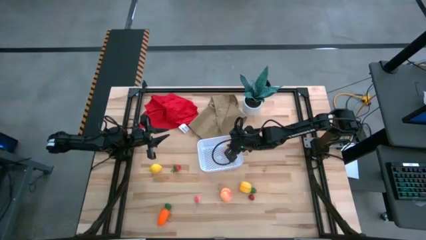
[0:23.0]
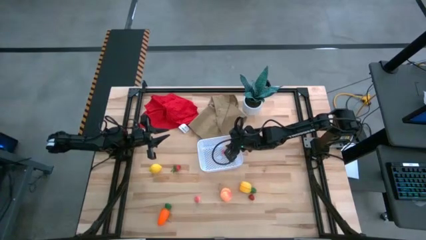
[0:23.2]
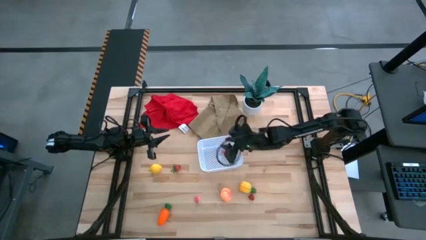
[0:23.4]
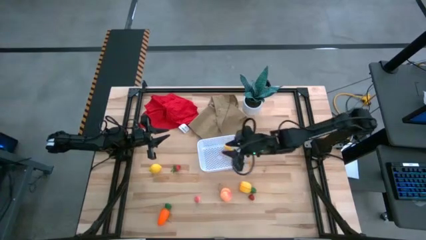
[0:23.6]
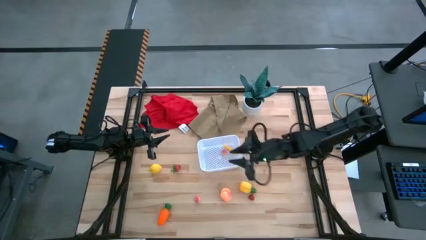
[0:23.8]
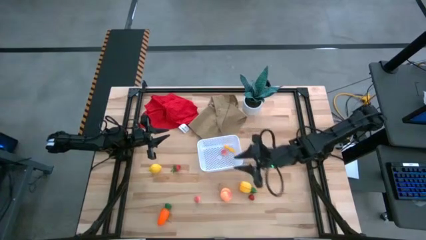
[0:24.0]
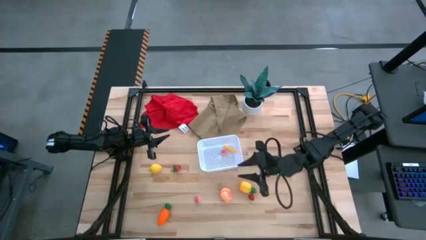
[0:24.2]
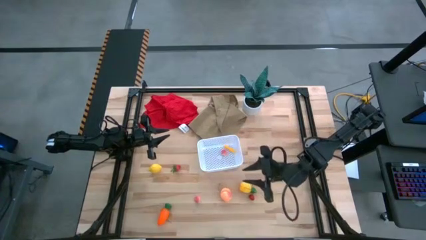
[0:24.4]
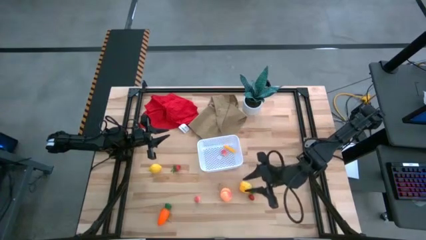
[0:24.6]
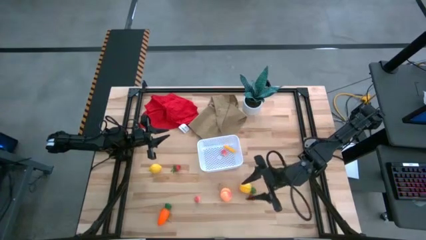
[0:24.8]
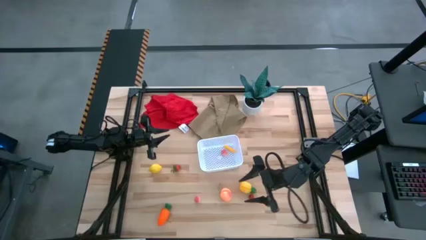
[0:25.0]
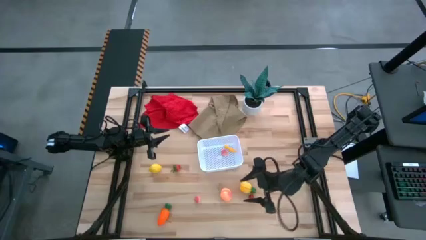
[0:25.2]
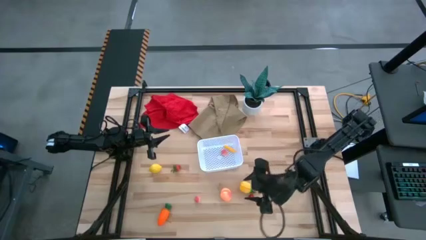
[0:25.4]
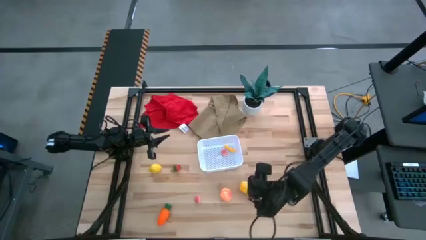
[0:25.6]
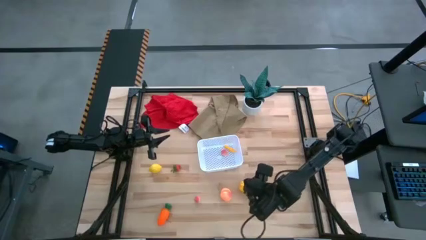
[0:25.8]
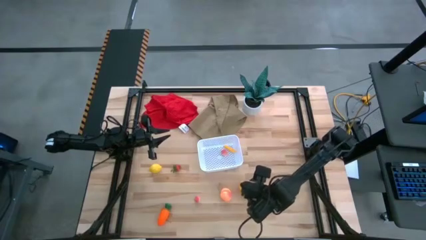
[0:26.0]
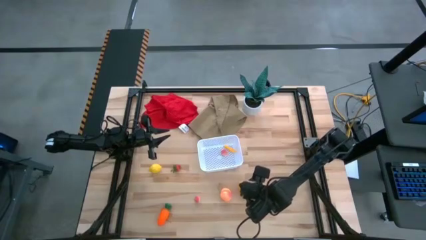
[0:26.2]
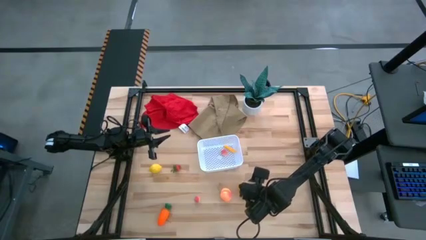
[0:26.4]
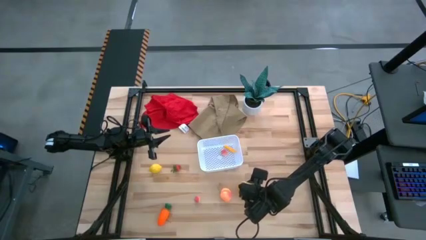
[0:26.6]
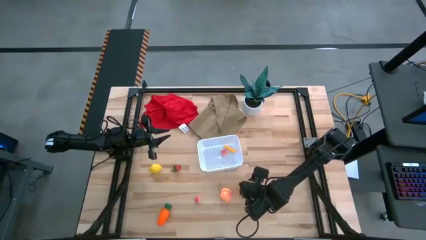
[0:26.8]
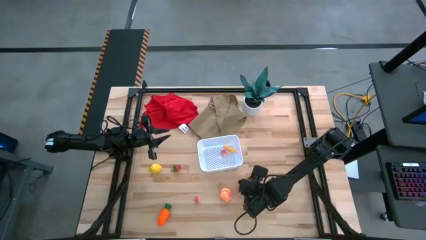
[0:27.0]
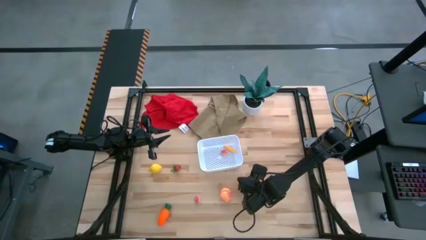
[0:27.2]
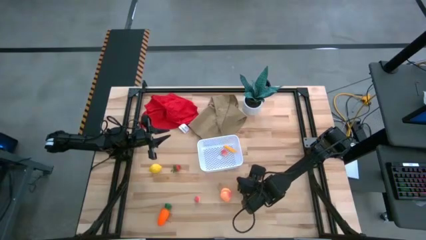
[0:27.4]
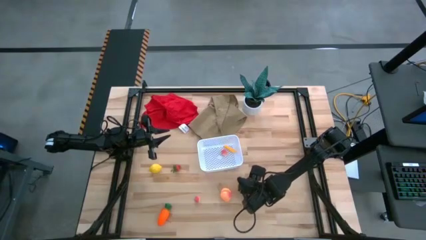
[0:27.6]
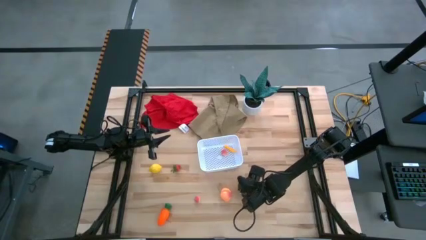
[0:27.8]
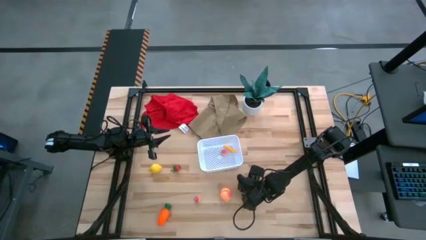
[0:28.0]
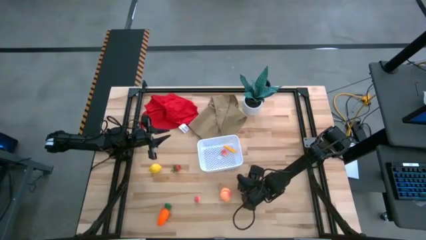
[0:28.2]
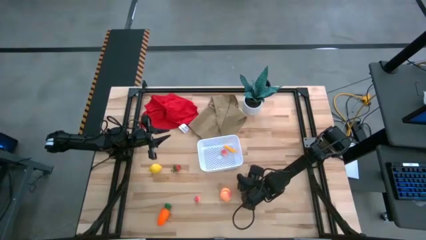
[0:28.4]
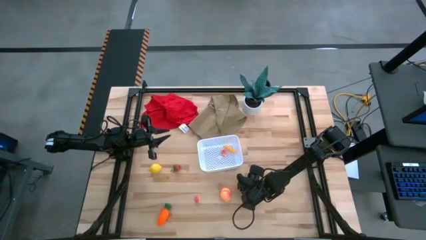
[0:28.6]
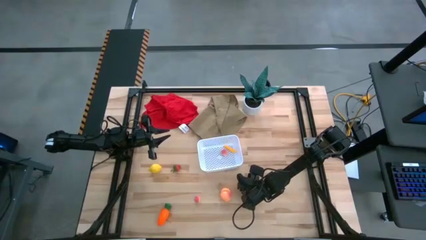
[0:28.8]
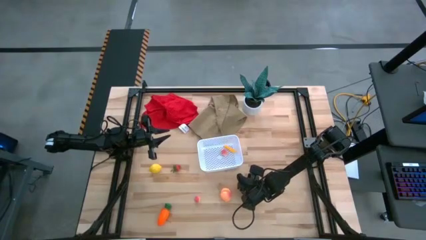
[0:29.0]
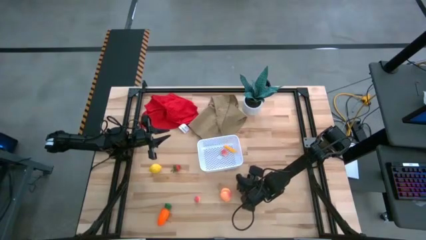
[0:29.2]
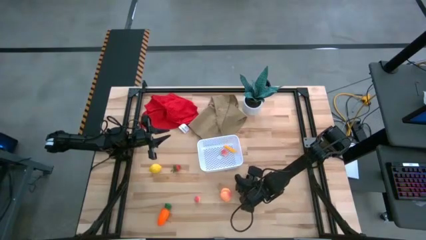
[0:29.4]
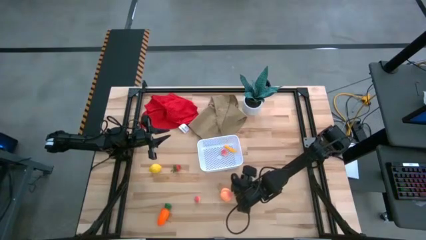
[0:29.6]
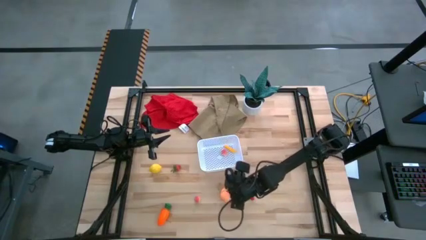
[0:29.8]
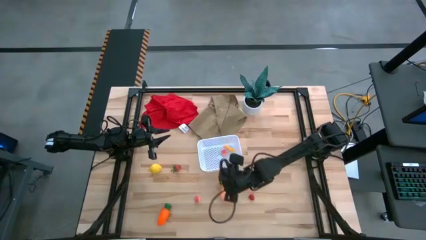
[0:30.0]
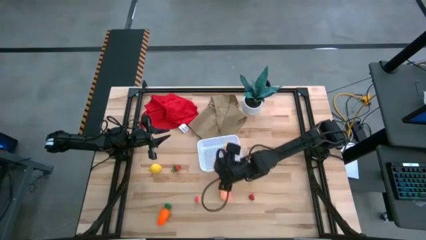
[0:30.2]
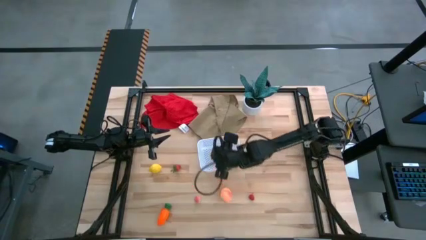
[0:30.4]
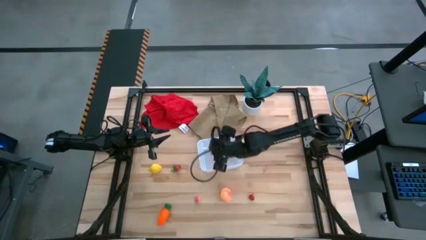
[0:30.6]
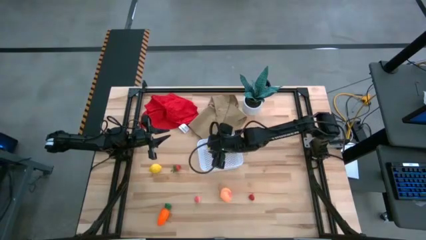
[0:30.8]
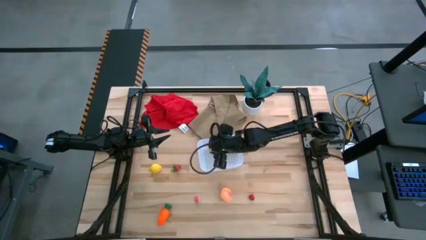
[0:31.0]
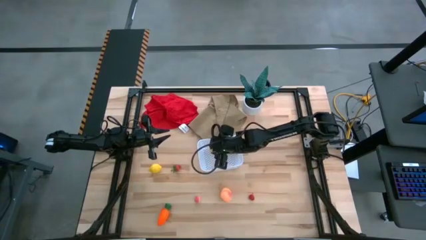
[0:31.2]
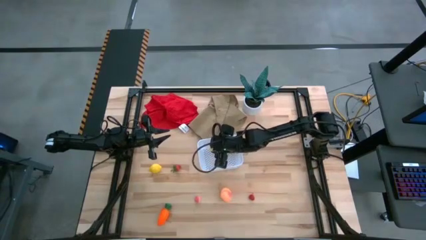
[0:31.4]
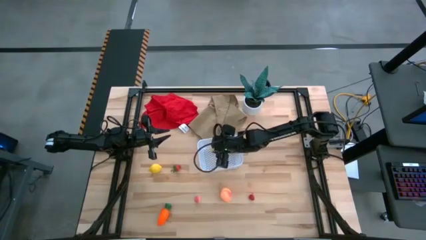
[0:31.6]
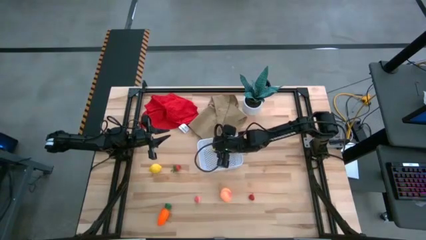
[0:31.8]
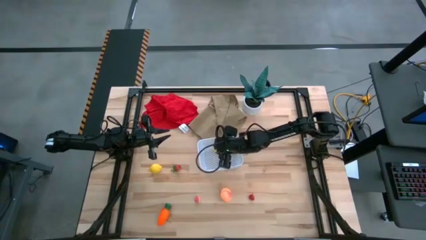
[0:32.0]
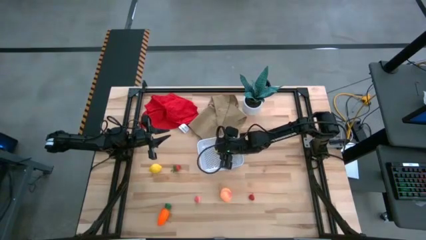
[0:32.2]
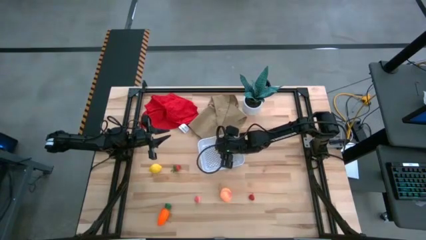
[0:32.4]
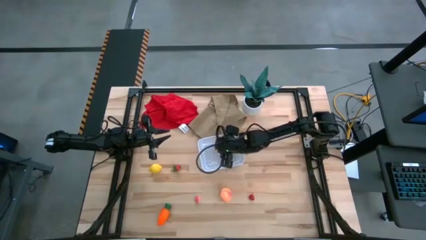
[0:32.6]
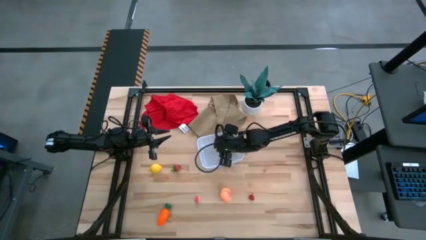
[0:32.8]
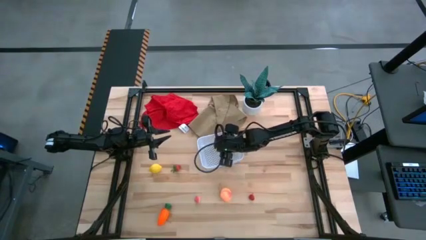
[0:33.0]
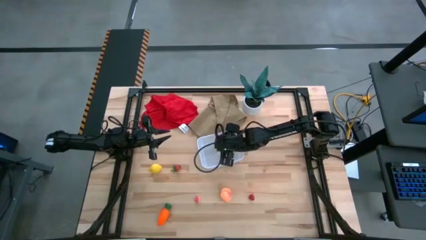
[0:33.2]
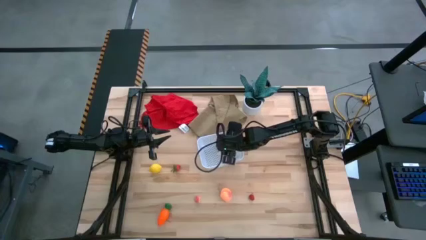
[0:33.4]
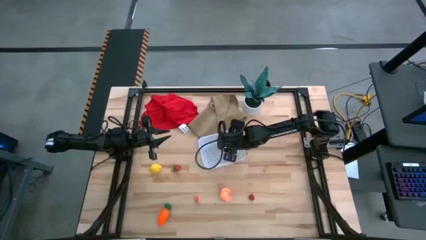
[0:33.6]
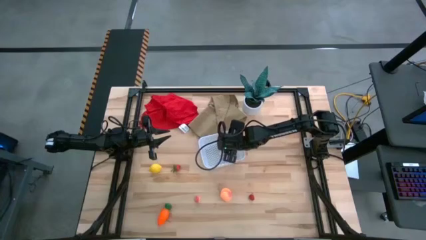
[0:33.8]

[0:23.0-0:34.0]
Task: Pick and placing Produce into tupperware
Put the pineapple into the white bin

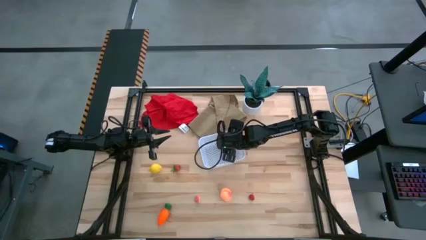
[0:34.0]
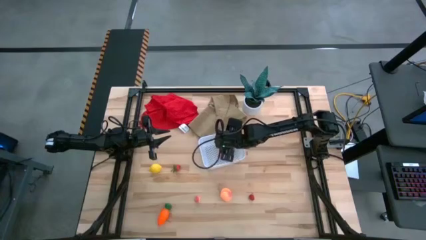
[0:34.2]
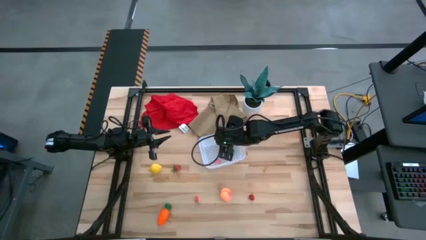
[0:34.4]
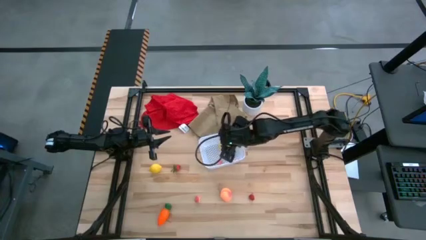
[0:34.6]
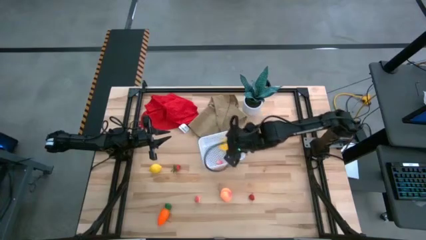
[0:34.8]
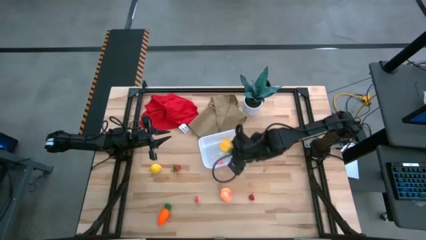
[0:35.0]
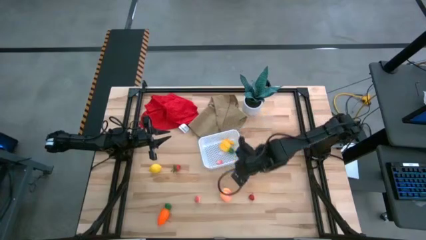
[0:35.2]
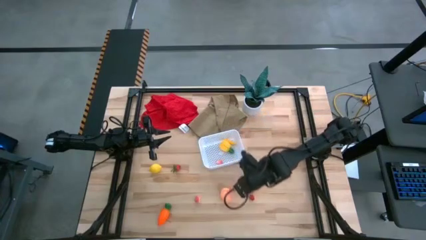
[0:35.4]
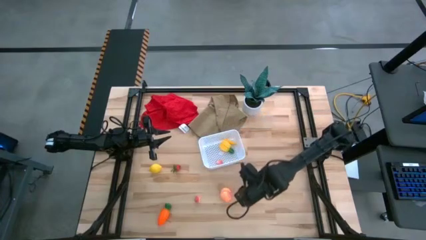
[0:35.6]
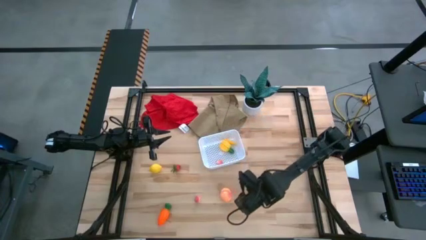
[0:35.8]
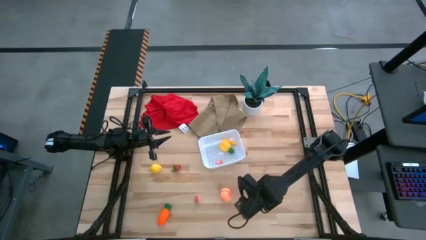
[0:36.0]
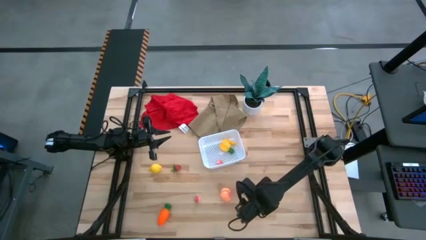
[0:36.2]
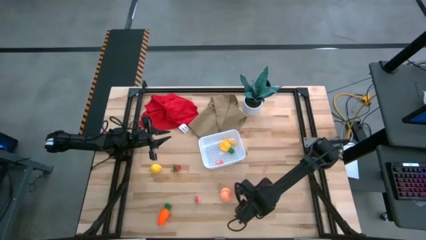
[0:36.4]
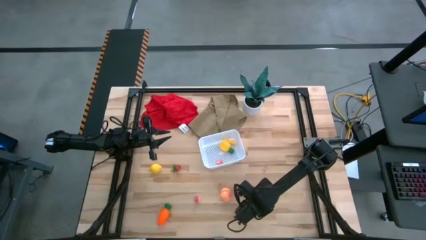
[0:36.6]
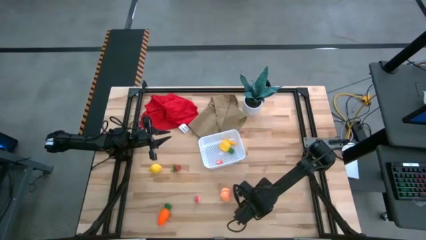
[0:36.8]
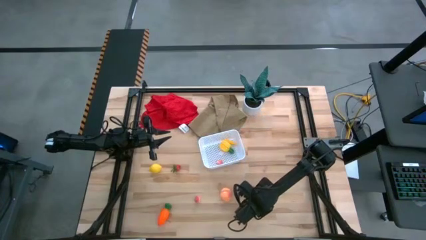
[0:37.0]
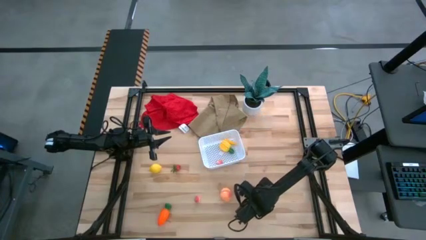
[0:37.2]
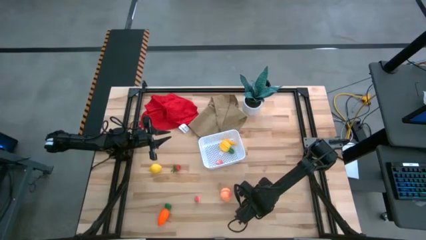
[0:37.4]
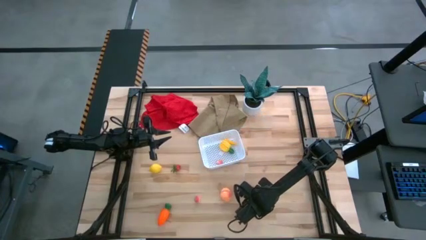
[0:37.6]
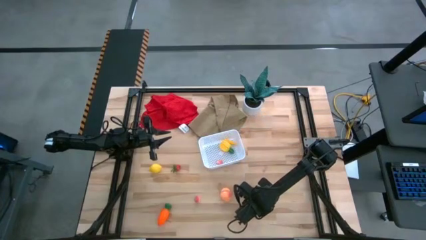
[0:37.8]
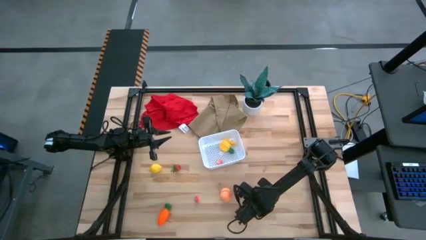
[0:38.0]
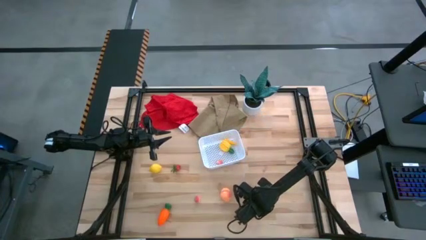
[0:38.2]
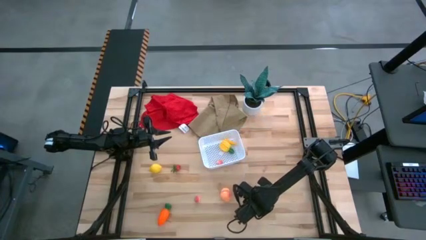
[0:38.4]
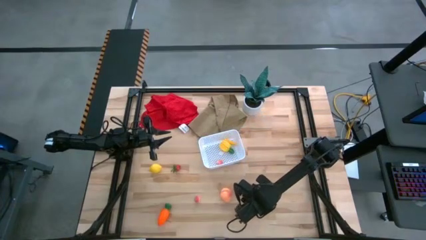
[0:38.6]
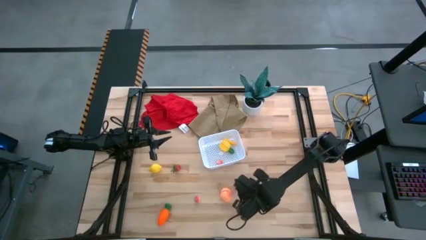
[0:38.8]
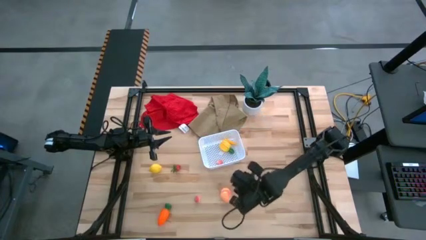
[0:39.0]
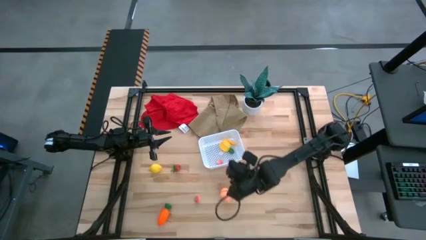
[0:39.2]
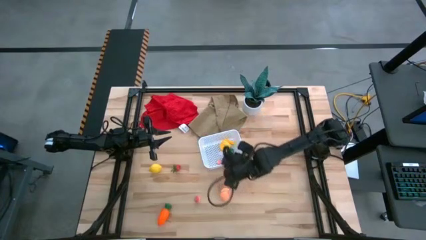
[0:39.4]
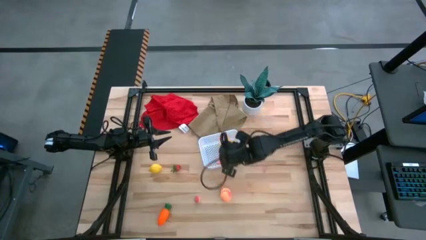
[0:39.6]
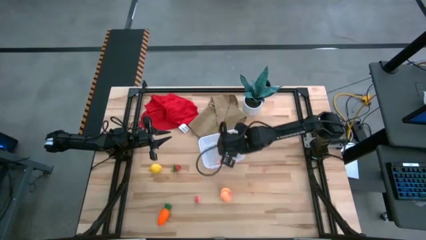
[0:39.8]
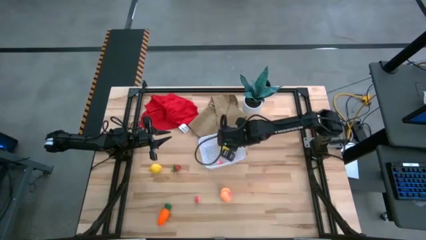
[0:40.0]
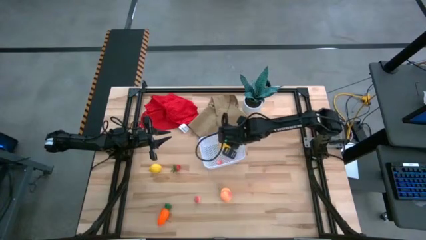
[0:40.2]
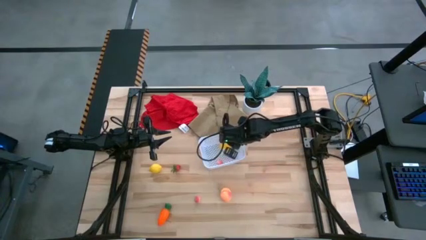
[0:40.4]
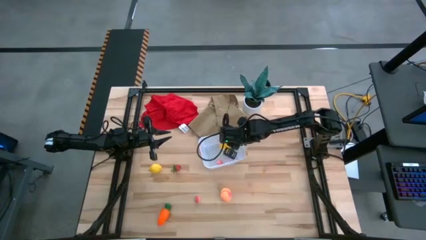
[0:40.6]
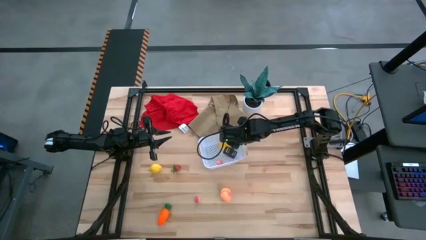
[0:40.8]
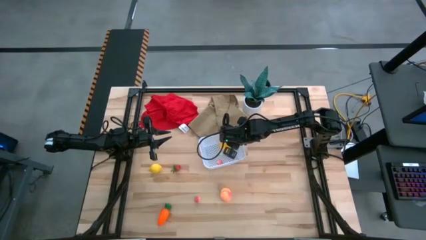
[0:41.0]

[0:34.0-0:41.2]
Put the raspberry into the white bin
